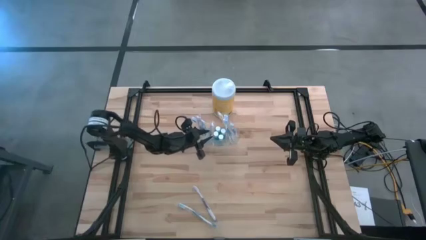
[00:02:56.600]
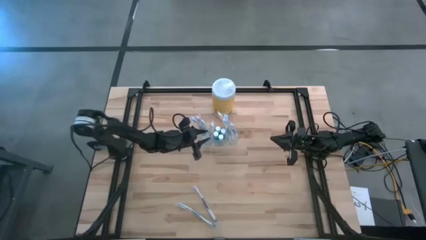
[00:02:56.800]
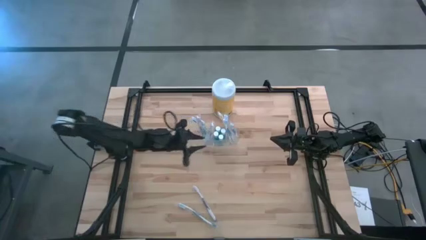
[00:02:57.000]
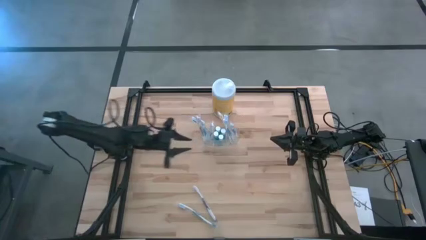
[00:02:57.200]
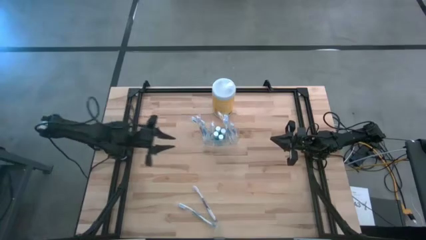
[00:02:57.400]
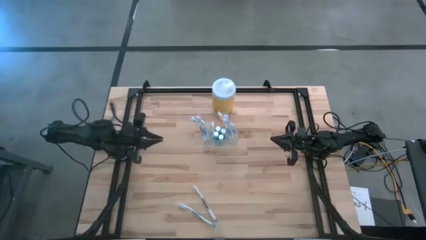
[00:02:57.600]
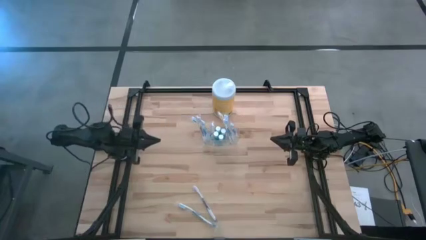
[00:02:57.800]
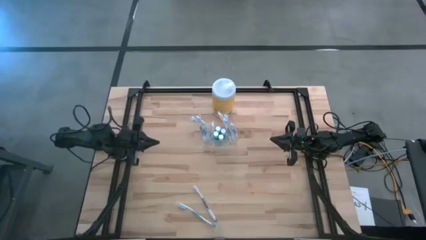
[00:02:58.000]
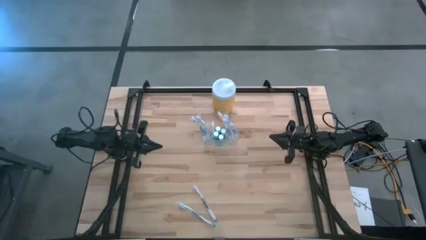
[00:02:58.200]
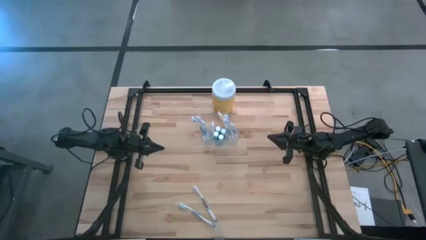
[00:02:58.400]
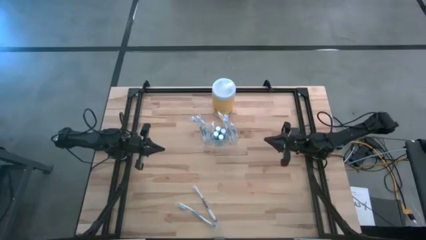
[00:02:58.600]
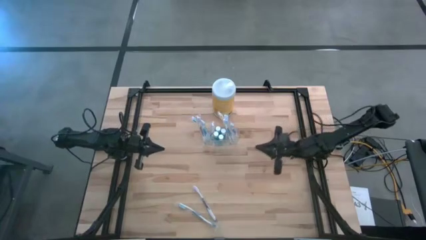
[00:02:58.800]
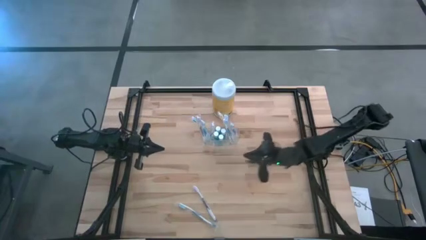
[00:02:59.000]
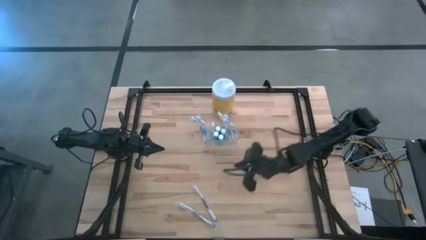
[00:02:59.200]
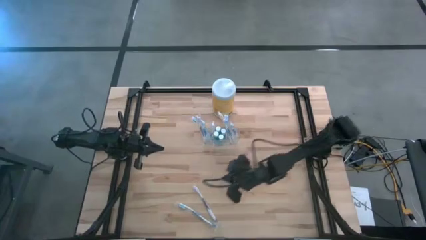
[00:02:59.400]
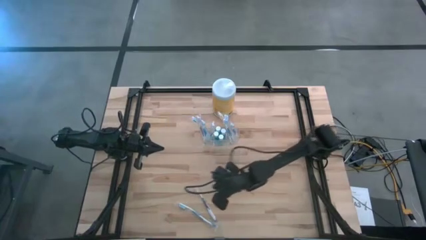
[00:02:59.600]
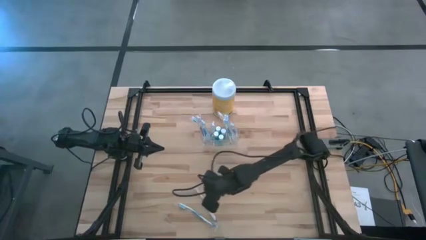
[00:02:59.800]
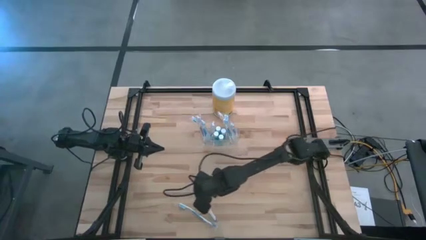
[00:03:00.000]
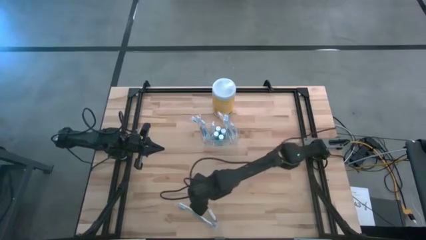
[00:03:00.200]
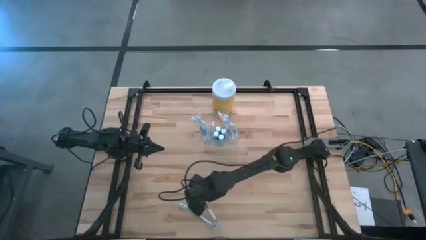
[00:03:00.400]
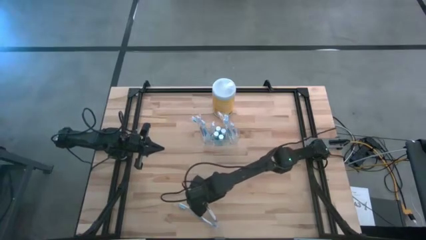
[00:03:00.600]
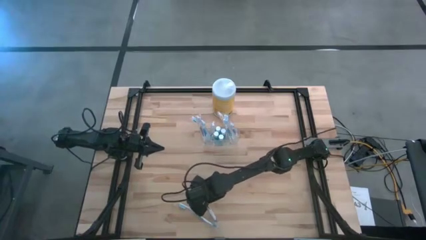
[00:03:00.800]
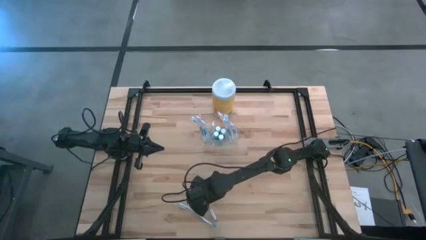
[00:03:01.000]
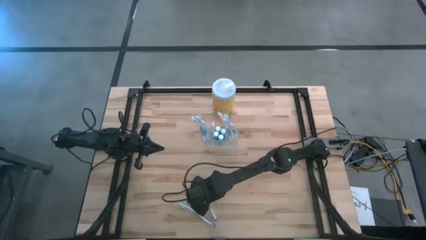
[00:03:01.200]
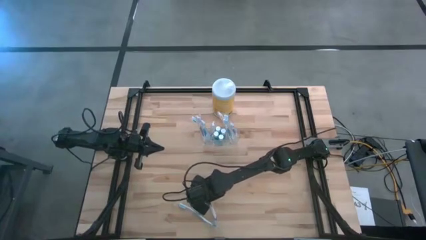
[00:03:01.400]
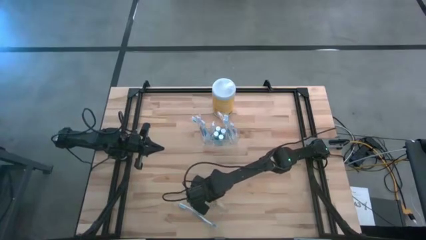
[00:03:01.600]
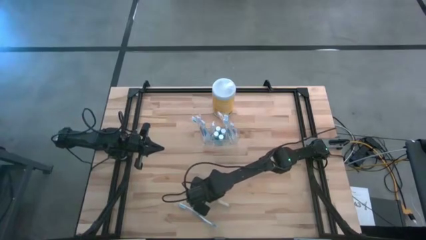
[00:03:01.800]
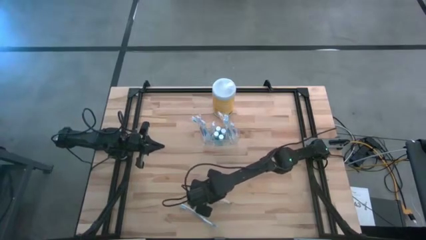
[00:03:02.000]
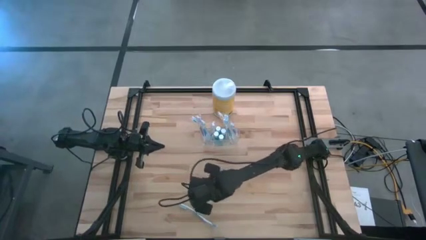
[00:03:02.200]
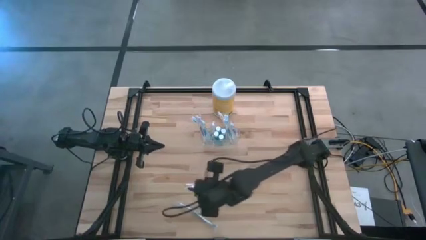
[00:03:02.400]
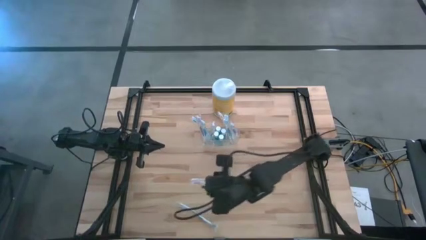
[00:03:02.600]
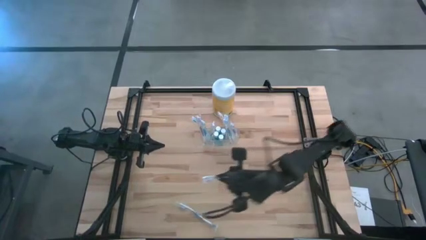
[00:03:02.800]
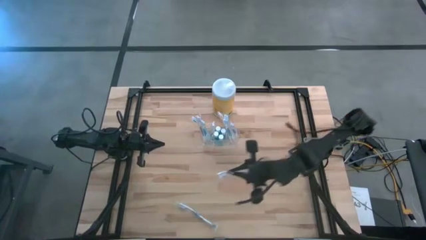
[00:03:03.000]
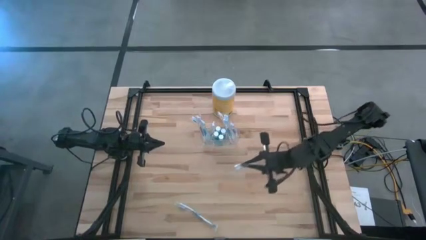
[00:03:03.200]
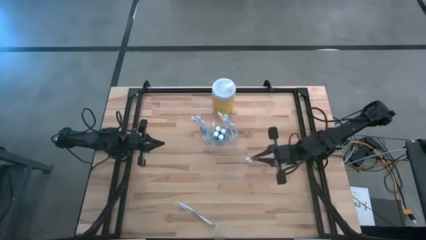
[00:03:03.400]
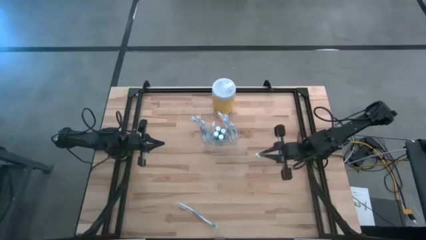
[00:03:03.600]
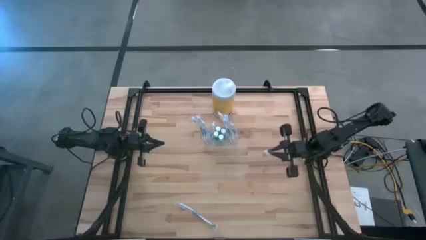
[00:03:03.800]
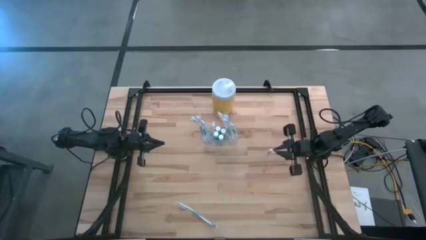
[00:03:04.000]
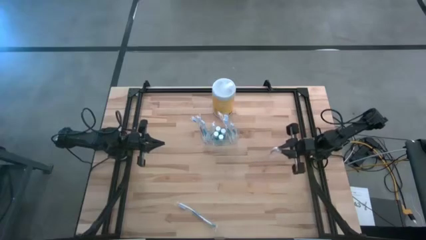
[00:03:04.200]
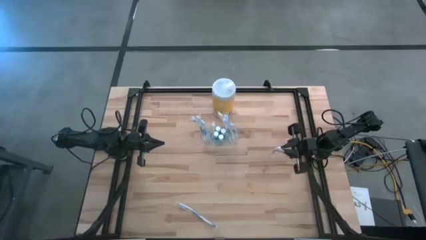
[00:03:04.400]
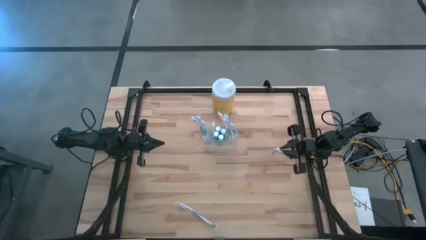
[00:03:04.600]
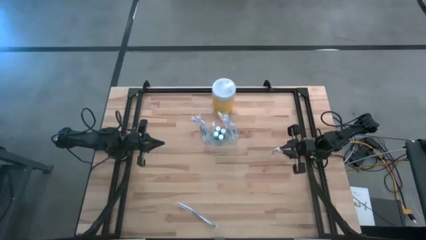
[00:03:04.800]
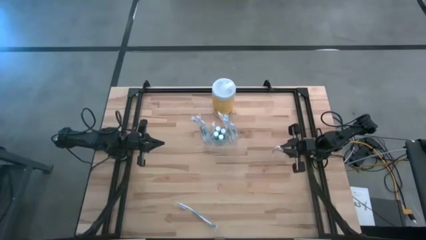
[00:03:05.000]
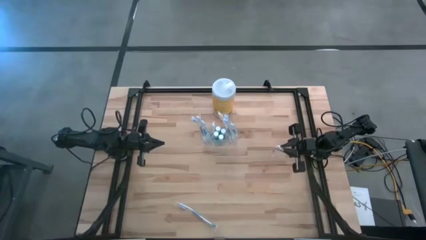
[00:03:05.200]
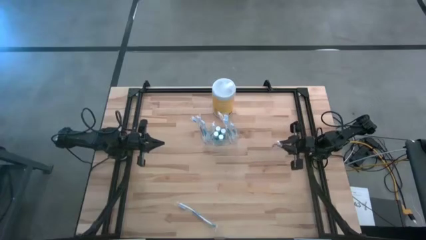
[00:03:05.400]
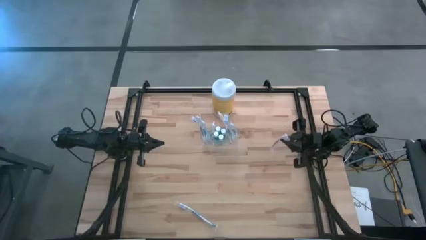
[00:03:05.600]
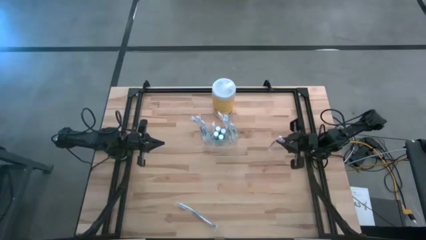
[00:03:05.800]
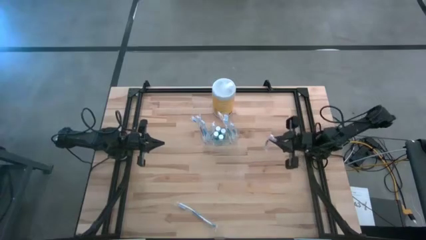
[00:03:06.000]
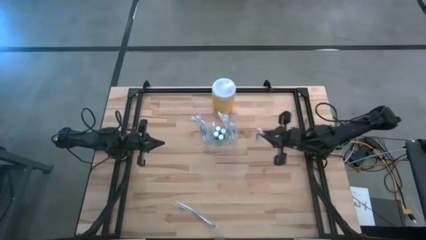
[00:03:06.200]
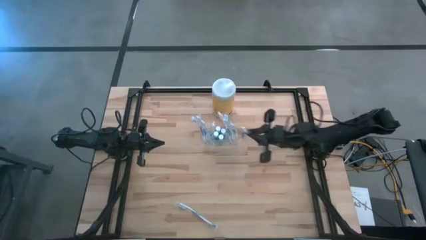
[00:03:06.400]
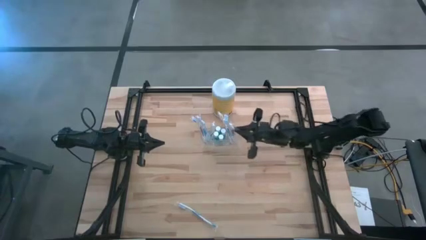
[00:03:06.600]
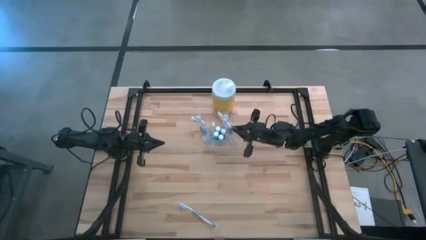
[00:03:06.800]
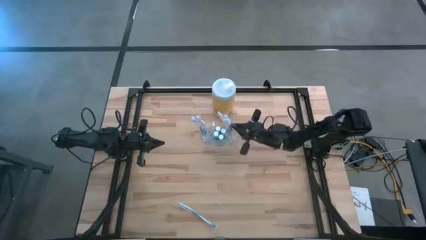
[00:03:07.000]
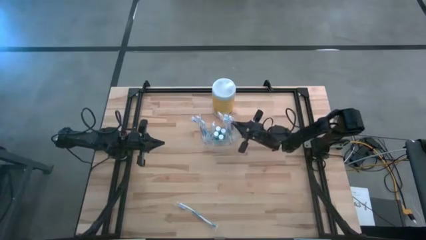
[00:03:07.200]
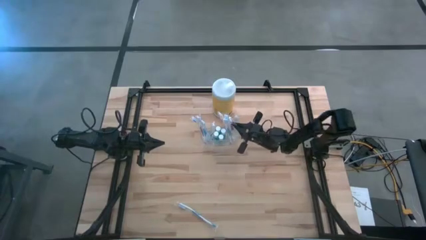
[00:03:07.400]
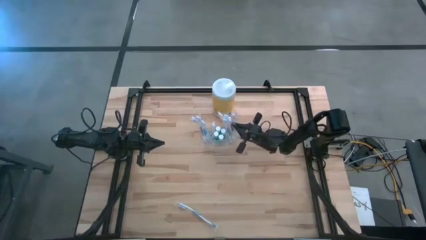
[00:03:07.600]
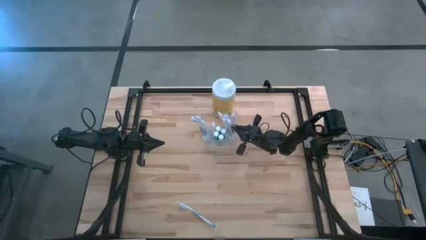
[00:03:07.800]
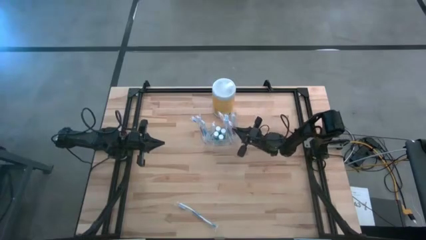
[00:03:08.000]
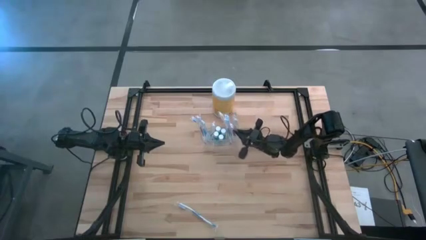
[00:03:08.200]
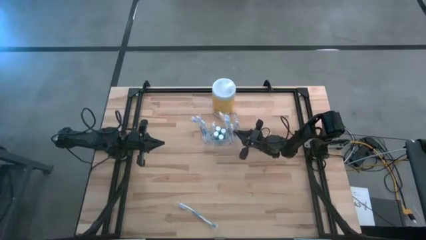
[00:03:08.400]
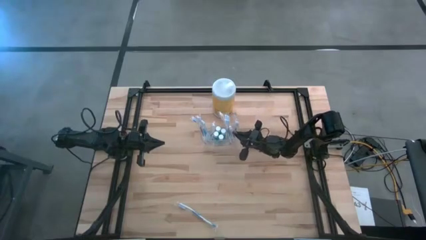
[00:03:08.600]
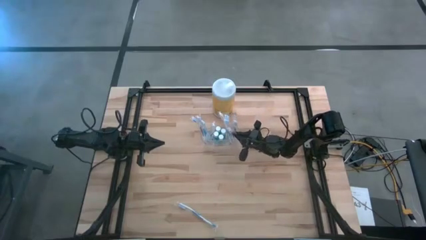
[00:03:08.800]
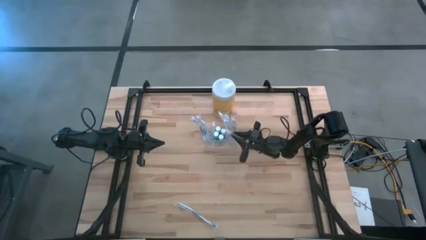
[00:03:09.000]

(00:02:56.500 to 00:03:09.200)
Task: Pick & Place toothbrushing station
Put the violet toothbrush into the transparent organizer

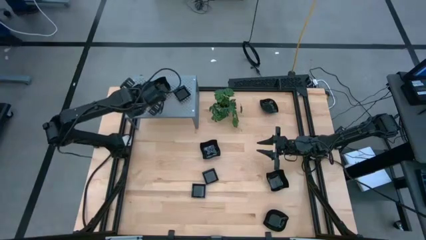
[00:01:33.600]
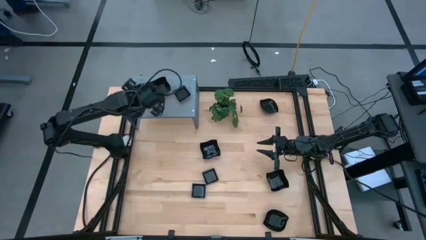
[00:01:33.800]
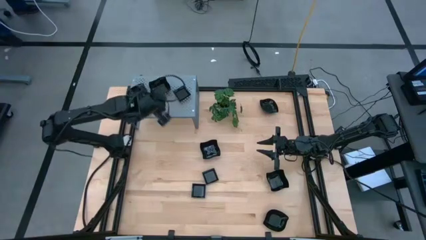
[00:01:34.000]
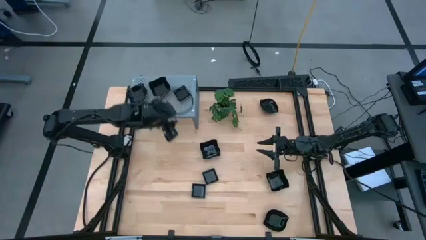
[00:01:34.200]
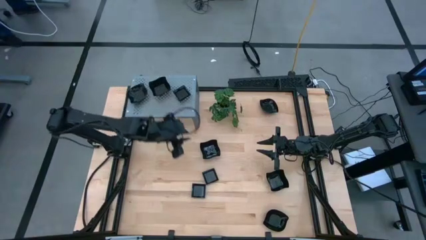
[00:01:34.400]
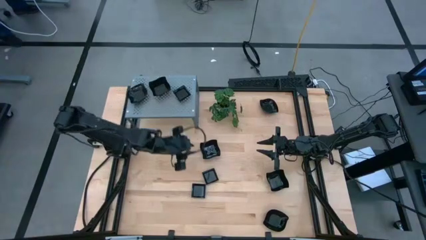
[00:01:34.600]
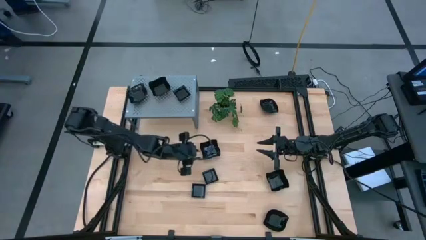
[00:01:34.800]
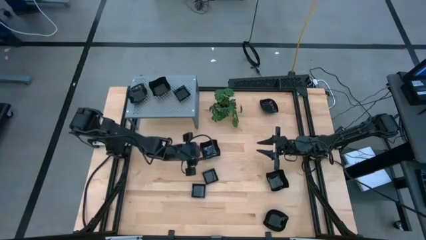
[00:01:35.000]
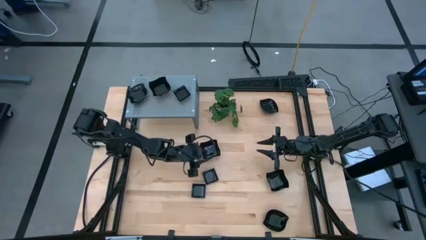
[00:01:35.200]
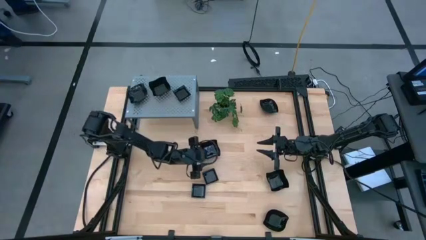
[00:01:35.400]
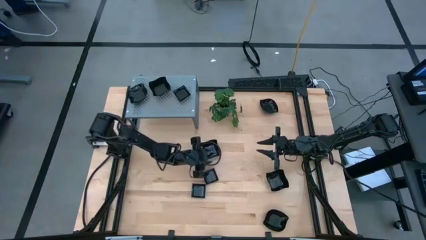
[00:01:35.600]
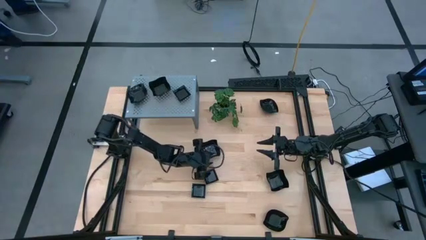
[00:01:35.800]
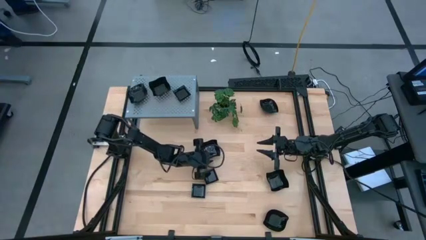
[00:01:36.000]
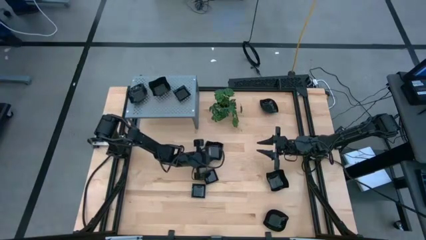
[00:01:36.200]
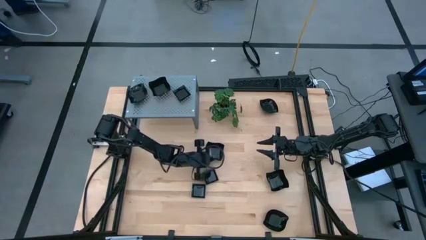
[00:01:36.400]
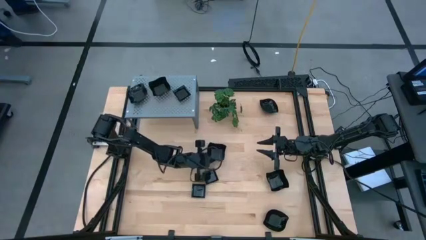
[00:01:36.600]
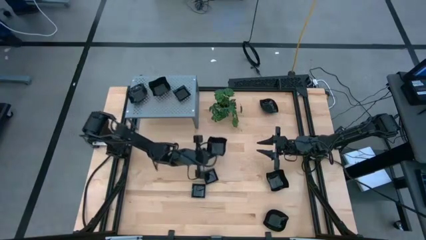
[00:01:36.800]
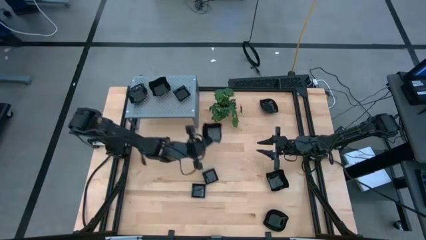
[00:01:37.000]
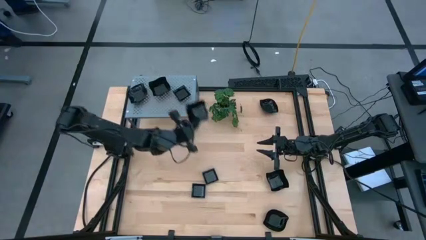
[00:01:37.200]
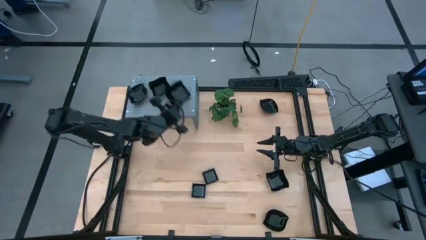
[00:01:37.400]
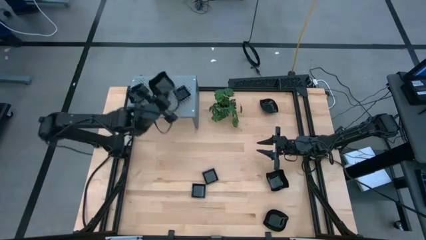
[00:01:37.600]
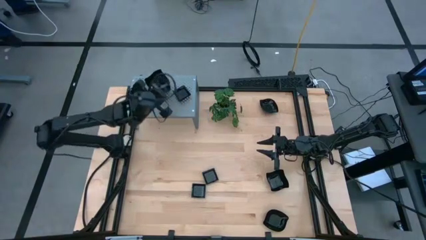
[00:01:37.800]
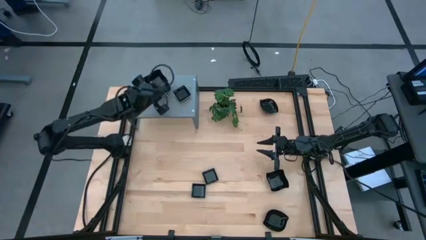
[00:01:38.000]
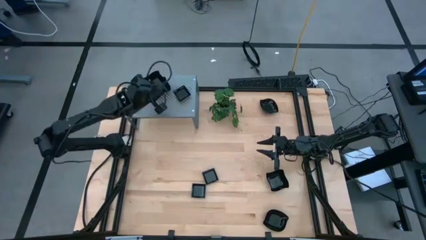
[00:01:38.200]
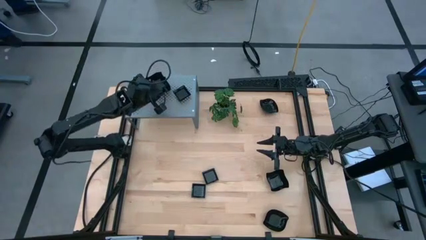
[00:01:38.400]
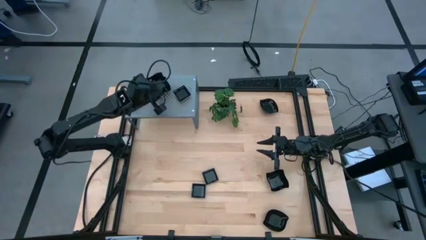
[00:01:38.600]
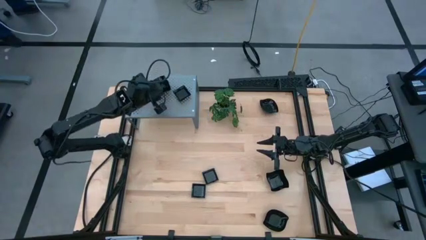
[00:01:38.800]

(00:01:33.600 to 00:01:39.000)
Task: Pick & Place Mini shaped plates
Stack the black square plate on top of the black square plate on the shelf
